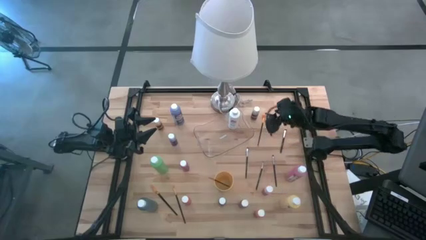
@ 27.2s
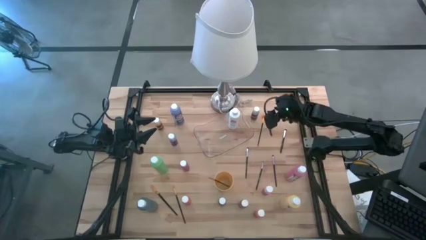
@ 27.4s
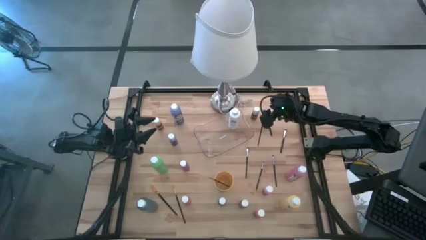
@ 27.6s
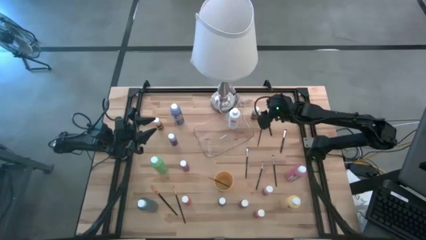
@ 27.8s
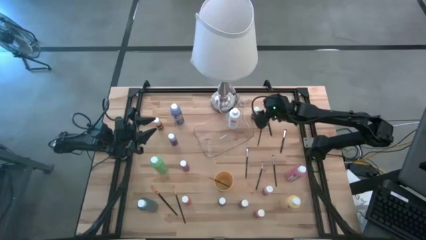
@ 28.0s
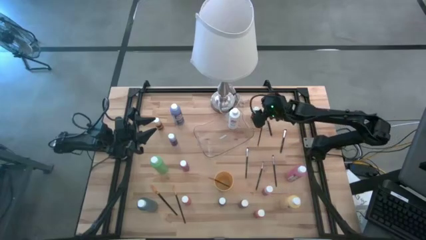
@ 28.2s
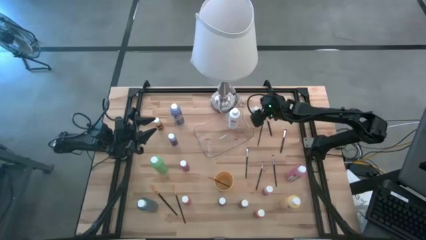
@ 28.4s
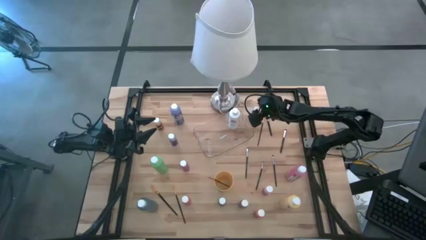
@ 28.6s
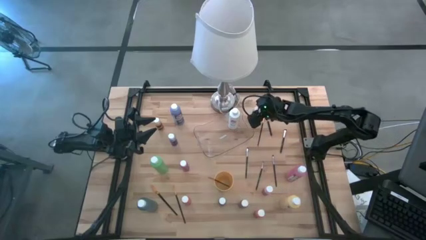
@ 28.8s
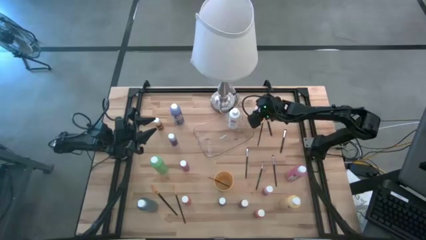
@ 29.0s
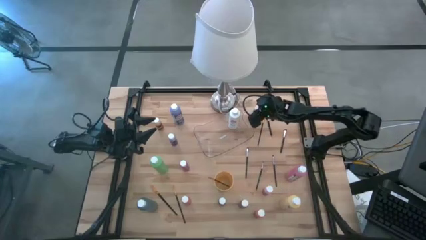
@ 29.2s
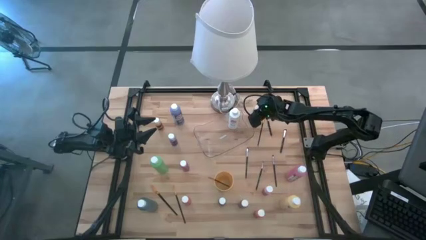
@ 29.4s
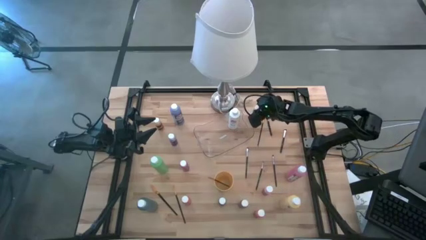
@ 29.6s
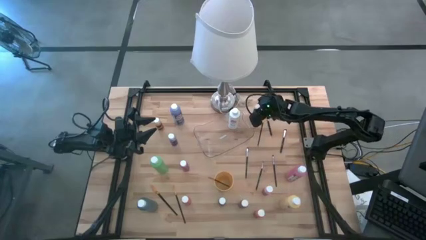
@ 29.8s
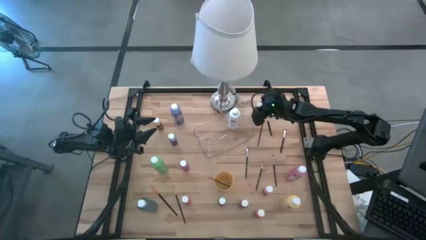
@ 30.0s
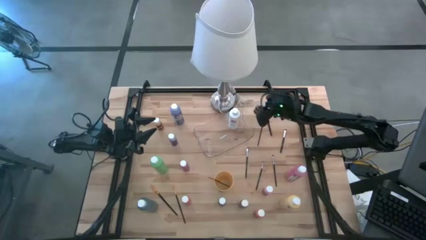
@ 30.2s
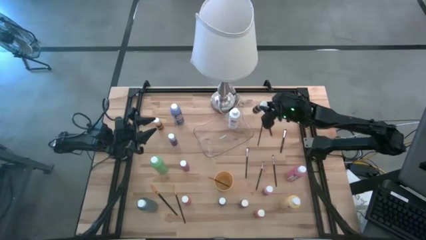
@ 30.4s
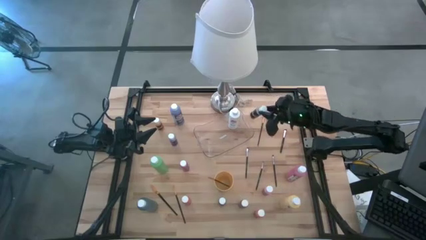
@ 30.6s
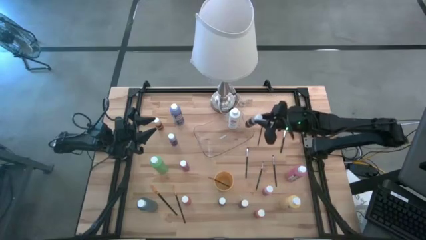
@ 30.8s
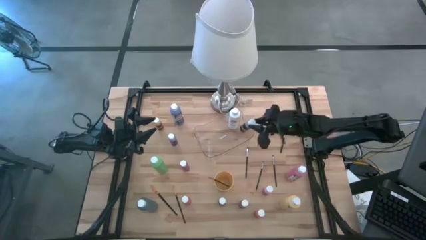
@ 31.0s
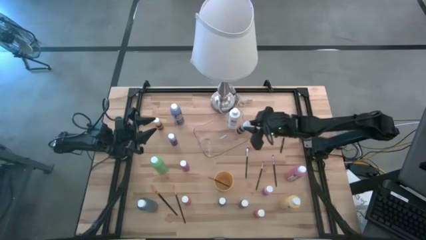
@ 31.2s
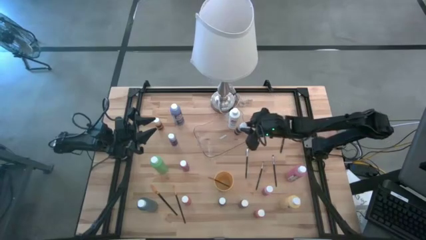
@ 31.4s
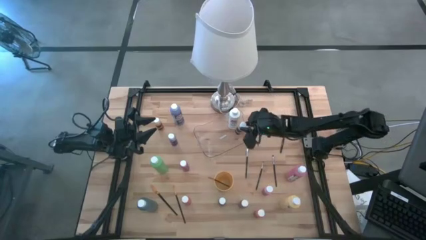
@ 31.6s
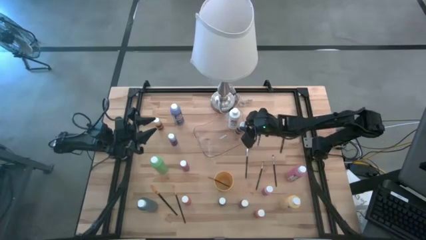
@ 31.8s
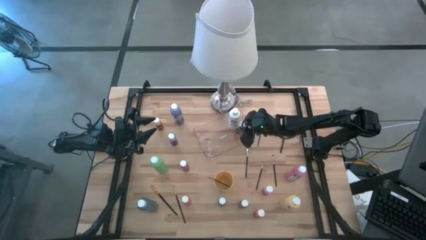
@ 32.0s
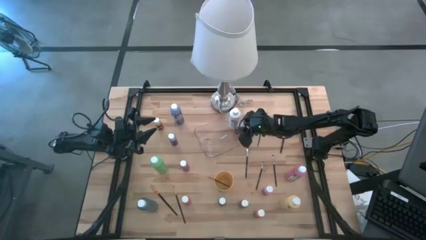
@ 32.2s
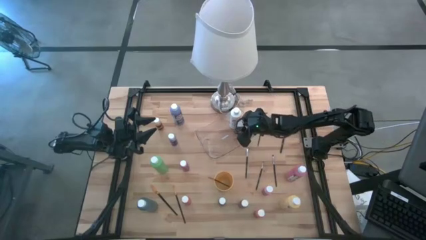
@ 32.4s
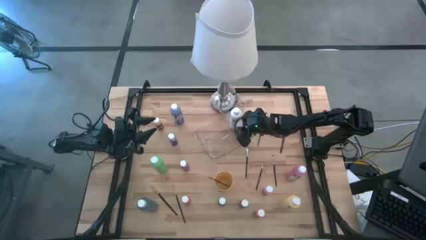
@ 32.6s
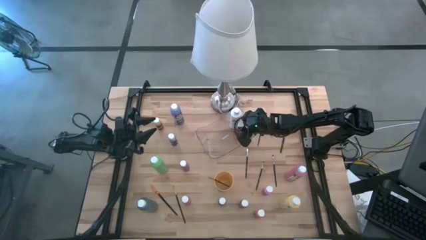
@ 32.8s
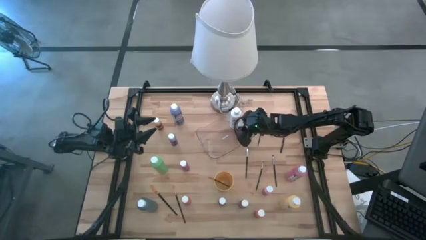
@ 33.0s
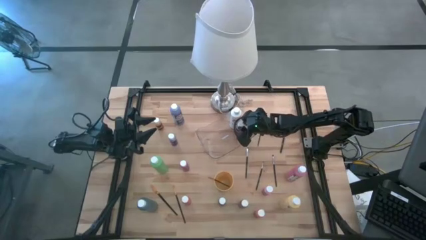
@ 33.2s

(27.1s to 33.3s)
Task: Pick & Place Paint Supplies
Put the gray bottle into the transparent bin

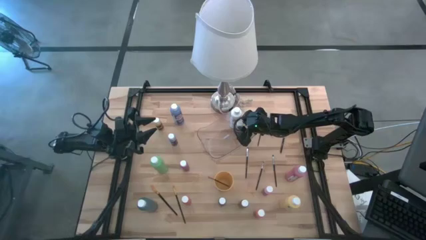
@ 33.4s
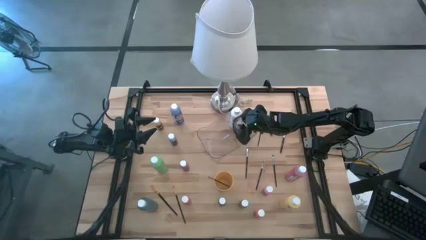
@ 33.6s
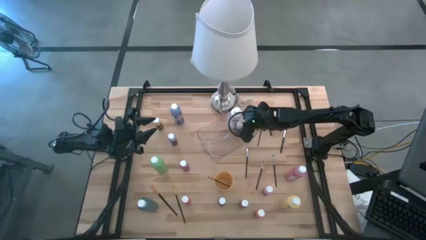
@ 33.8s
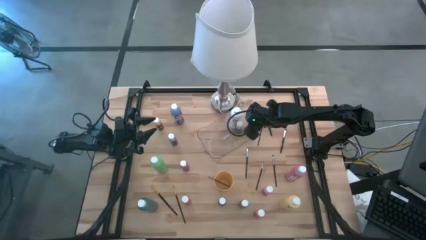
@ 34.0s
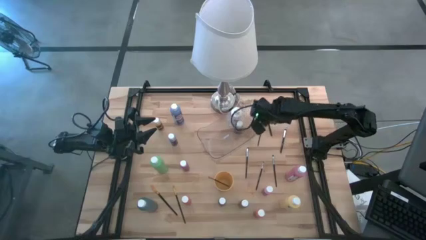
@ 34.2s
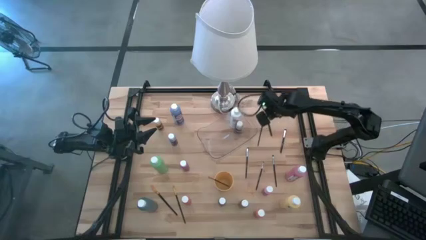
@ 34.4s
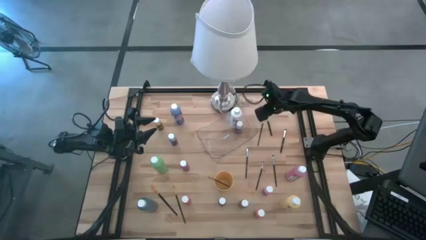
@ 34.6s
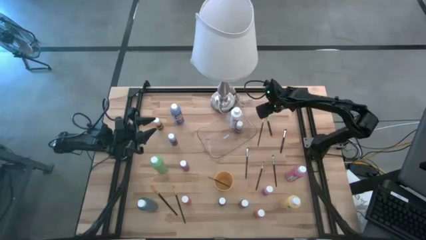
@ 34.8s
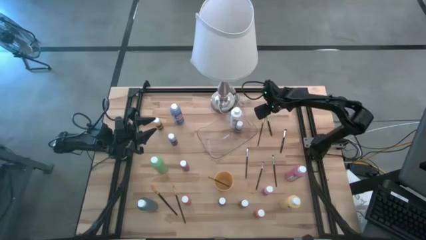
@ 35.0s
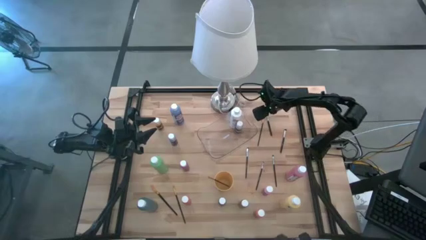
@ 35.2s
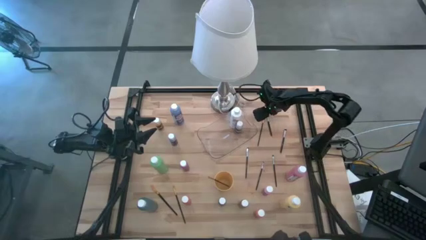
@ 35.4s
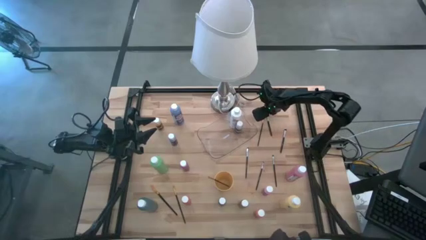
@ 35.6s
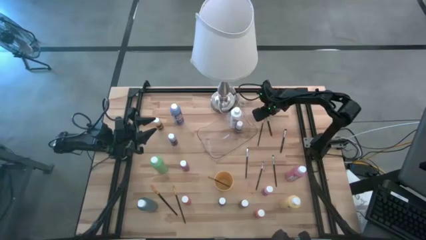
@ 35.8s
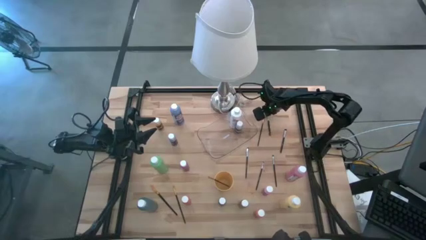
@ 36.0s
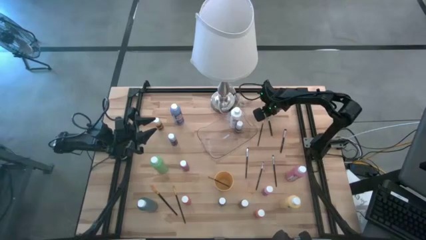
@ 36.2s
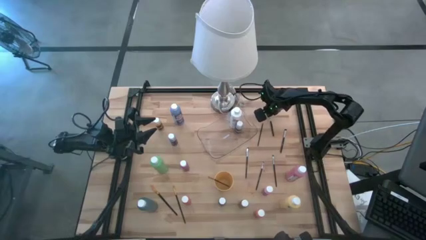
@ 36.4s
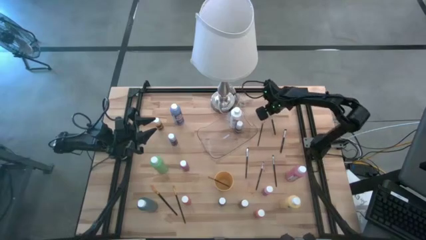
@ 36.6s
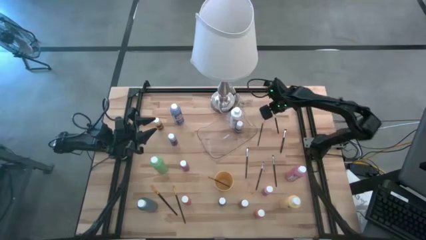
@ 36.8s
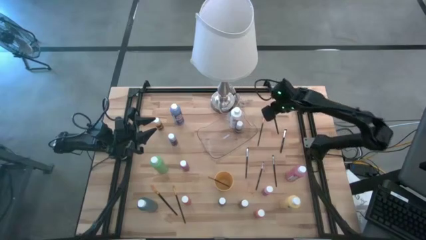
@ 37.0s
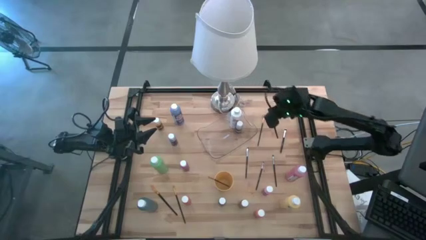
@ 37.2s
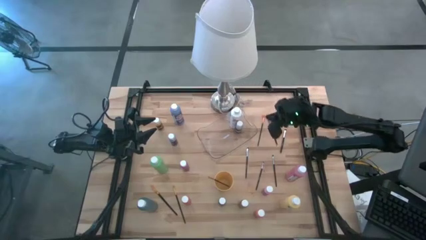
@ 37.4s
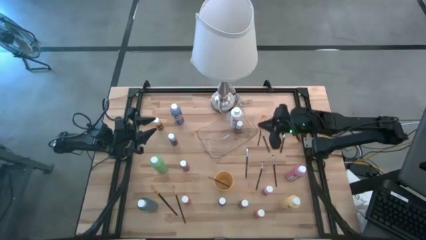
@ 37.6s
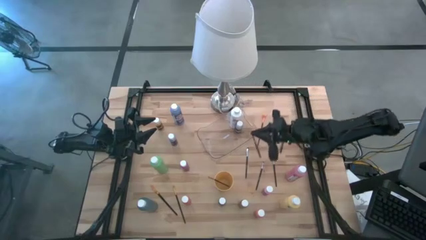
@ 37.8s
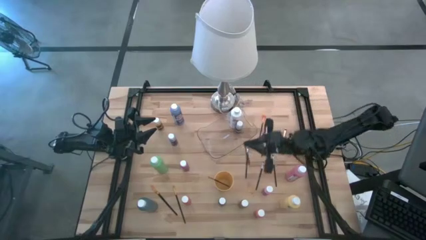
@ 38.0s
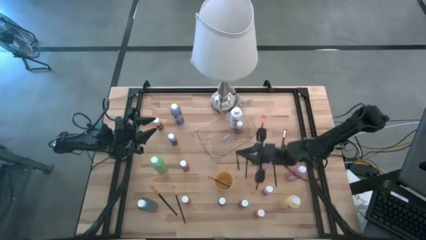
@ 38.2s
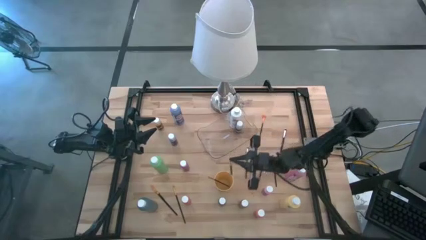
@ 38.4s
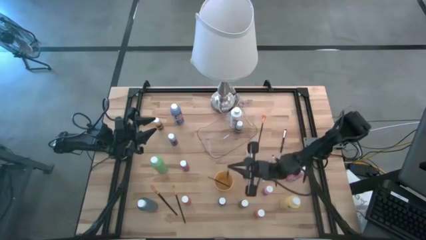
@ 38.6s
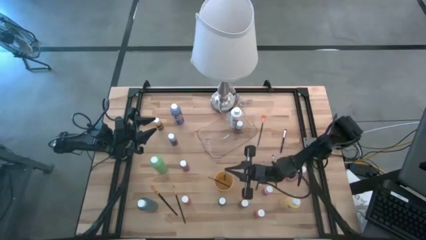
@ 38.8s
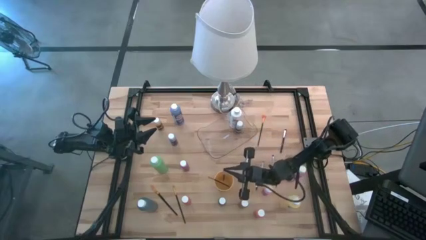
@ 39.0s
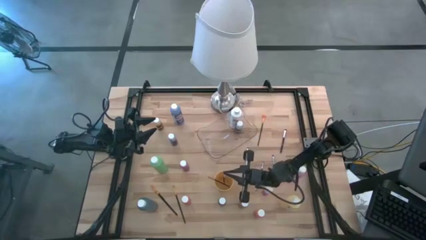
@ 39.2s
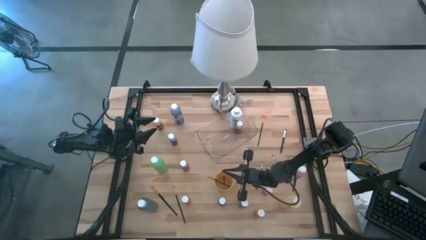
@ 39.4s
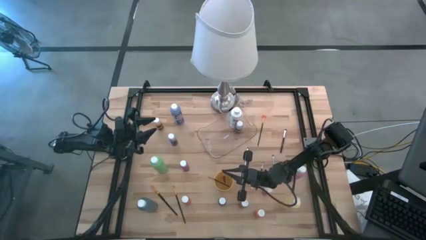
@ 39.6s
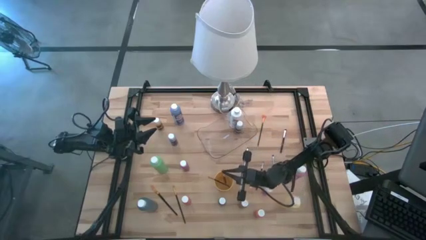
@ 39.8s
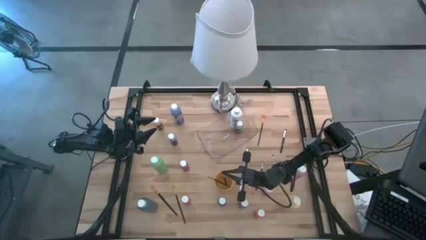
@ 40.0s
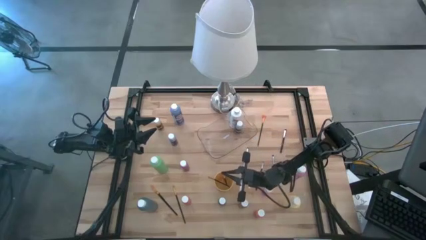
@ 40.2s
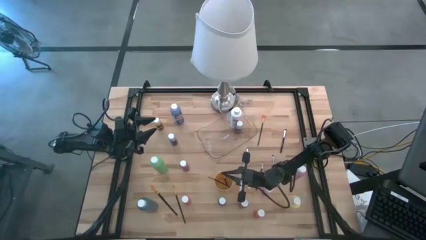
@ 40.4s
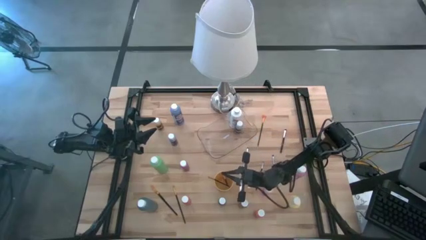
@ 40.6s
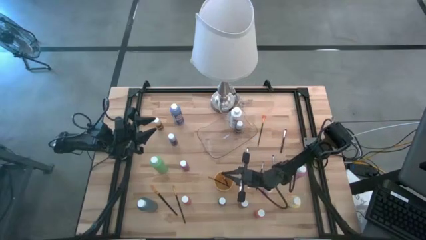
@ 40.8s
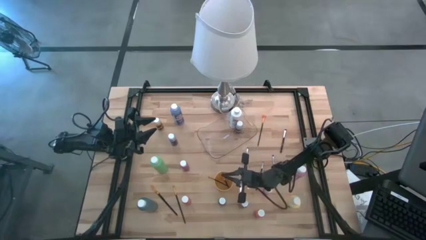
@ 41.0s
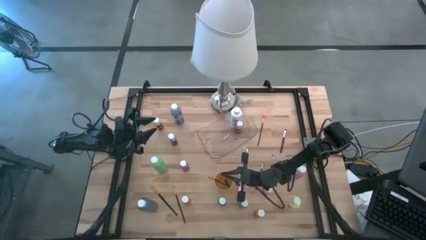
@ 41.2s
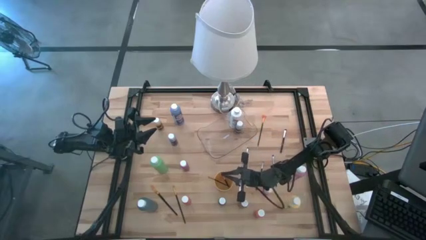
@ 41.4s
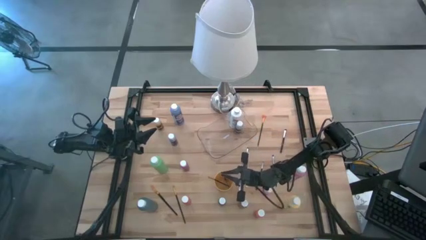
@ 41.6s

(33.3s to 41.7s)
Put the black paint brush into the yellow cup
